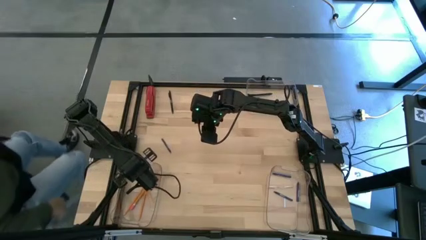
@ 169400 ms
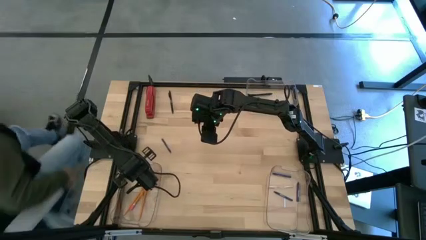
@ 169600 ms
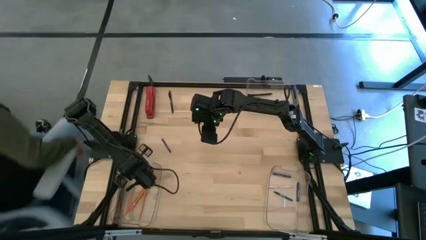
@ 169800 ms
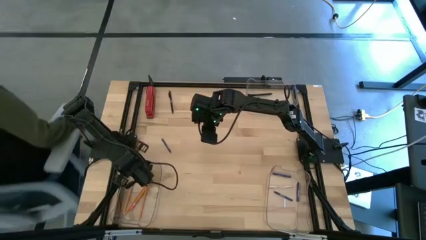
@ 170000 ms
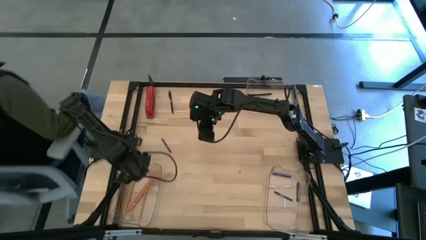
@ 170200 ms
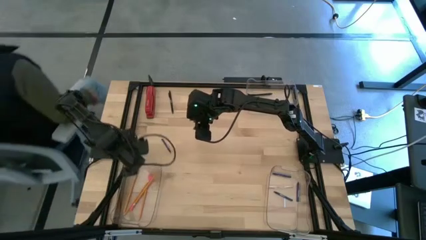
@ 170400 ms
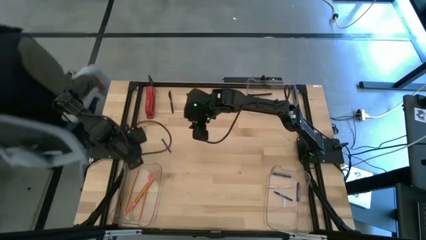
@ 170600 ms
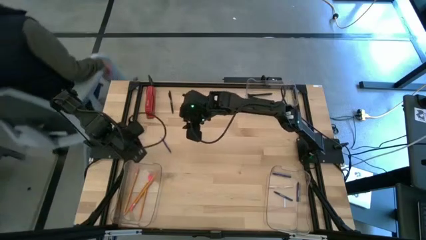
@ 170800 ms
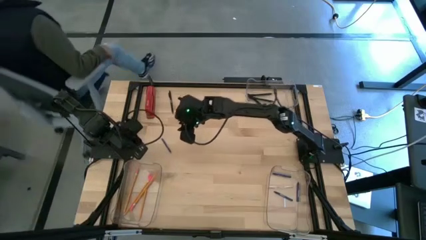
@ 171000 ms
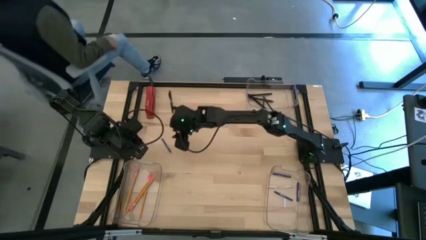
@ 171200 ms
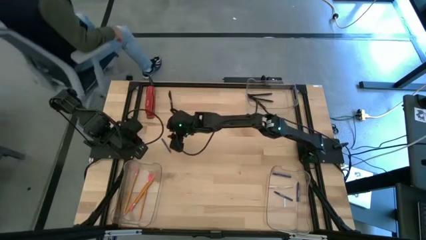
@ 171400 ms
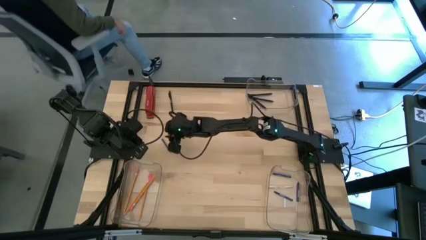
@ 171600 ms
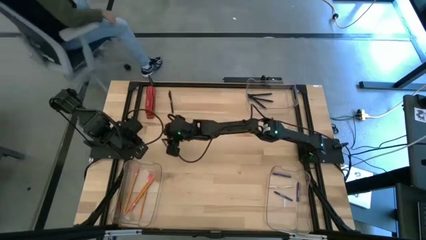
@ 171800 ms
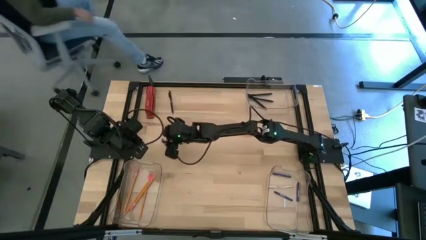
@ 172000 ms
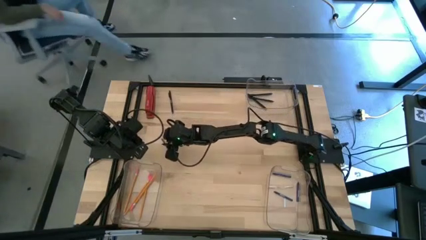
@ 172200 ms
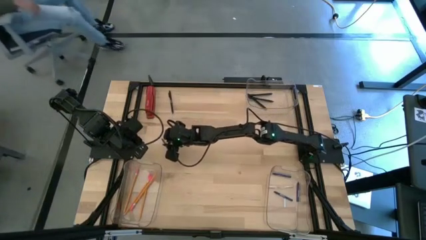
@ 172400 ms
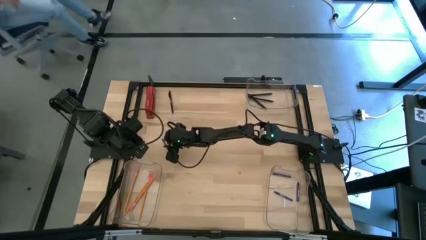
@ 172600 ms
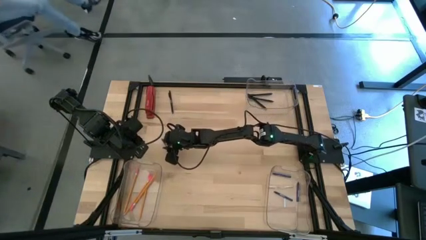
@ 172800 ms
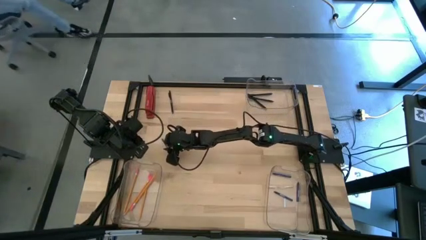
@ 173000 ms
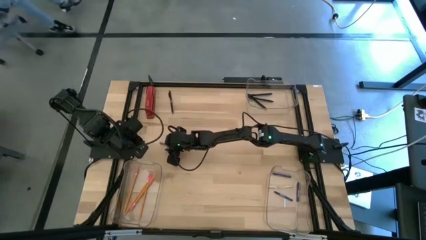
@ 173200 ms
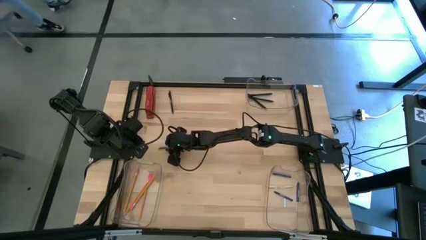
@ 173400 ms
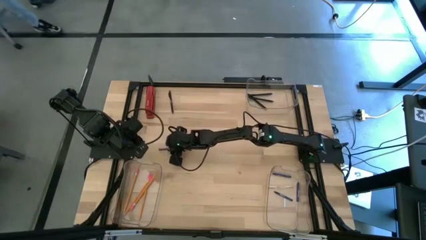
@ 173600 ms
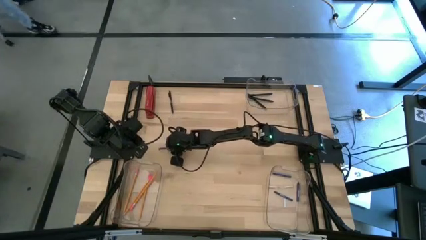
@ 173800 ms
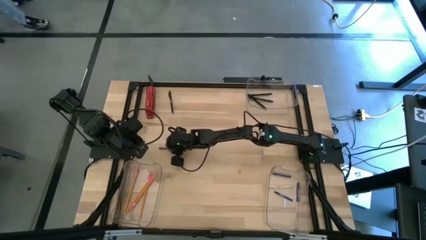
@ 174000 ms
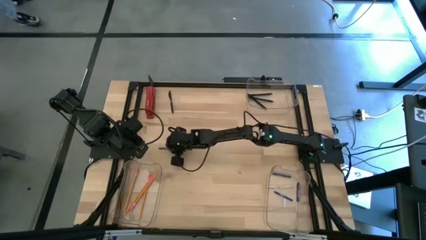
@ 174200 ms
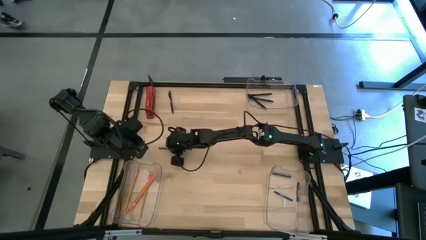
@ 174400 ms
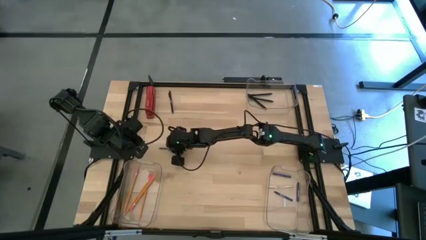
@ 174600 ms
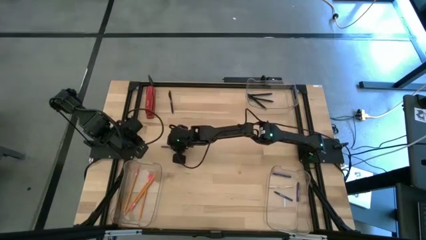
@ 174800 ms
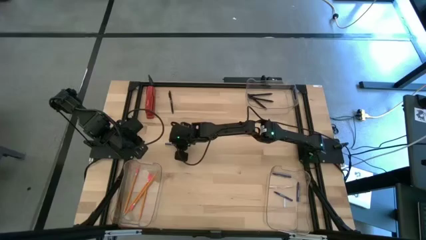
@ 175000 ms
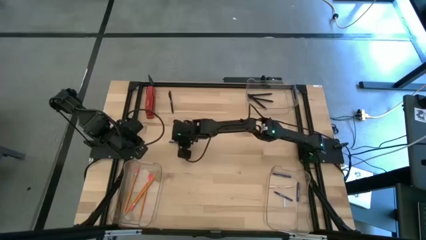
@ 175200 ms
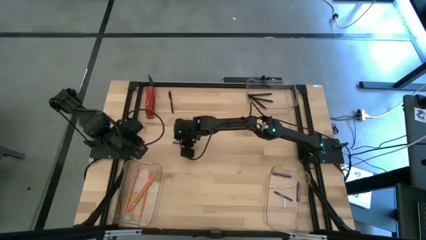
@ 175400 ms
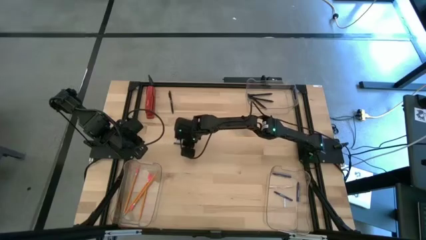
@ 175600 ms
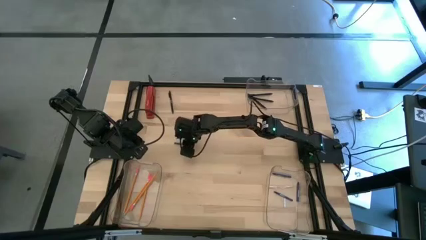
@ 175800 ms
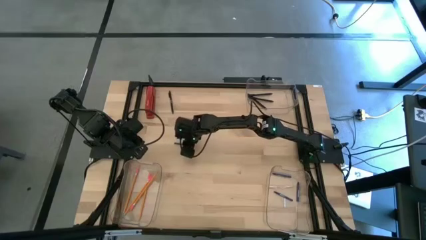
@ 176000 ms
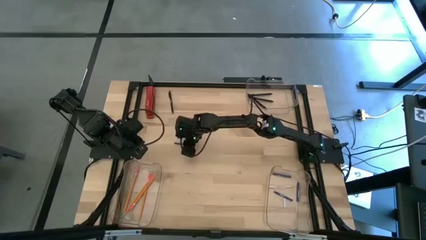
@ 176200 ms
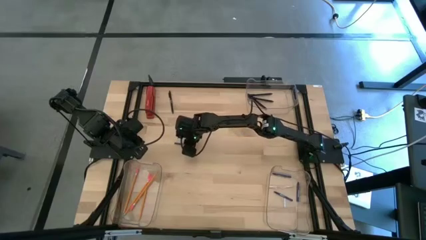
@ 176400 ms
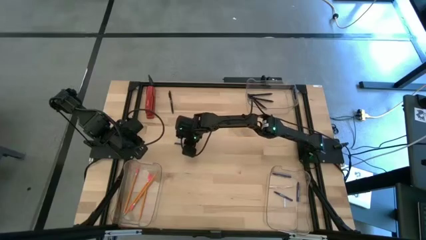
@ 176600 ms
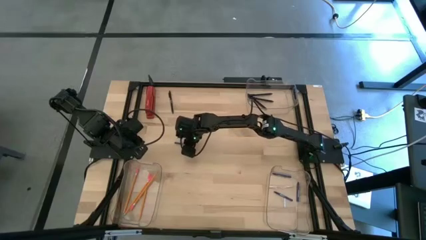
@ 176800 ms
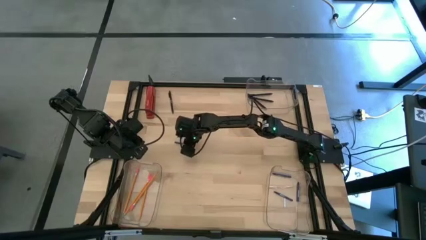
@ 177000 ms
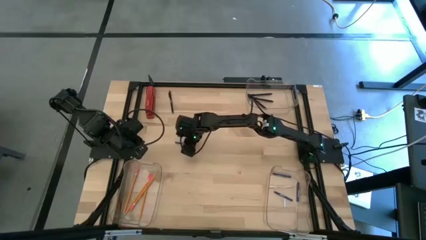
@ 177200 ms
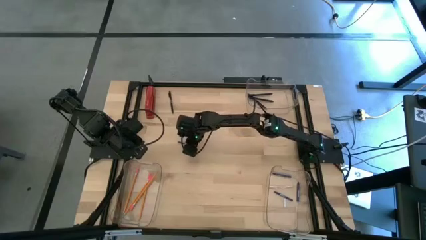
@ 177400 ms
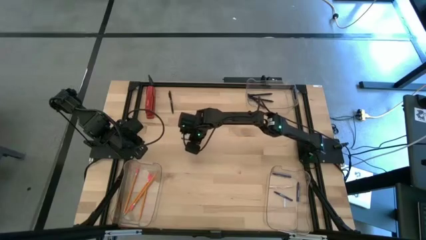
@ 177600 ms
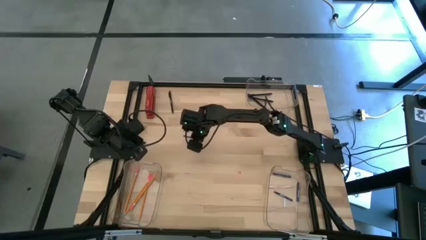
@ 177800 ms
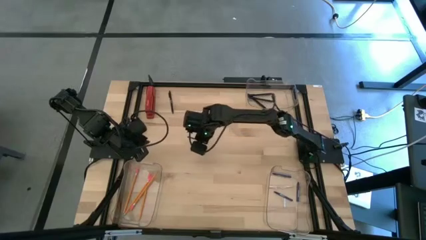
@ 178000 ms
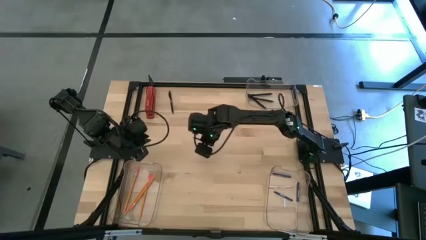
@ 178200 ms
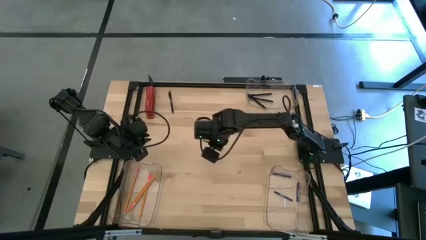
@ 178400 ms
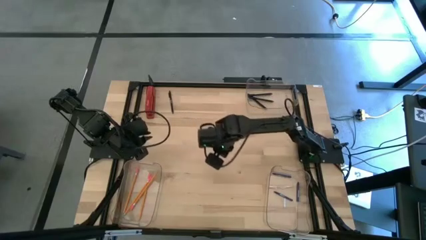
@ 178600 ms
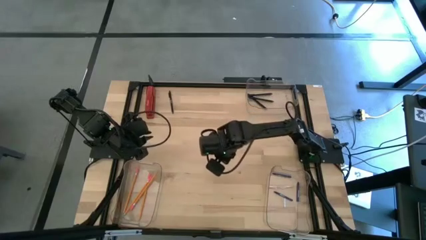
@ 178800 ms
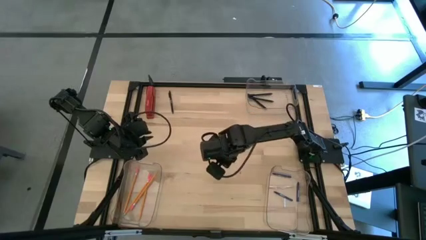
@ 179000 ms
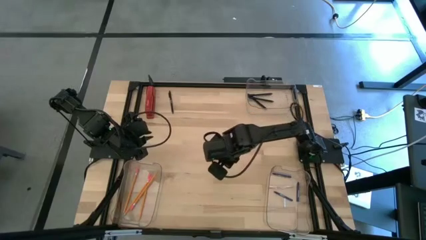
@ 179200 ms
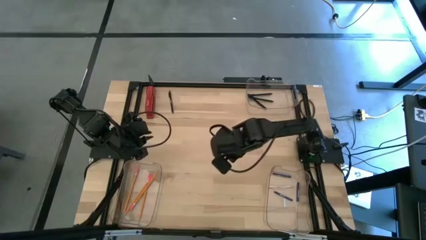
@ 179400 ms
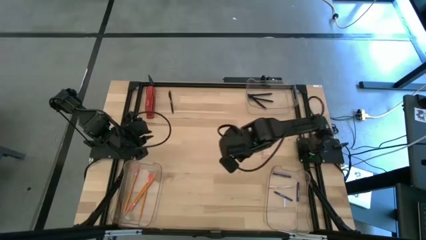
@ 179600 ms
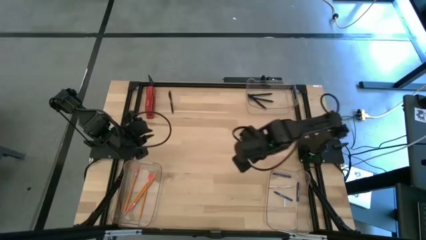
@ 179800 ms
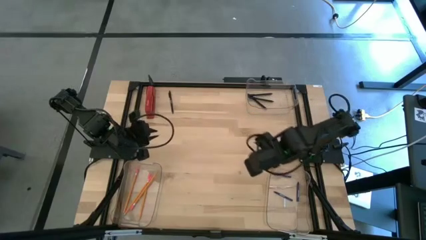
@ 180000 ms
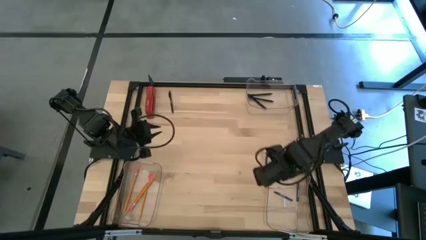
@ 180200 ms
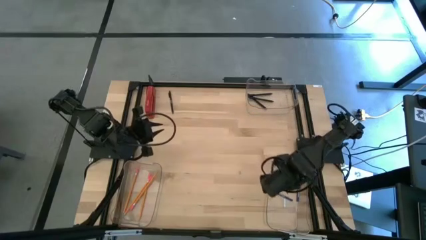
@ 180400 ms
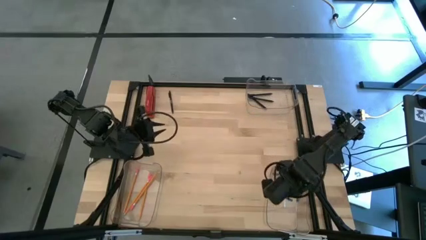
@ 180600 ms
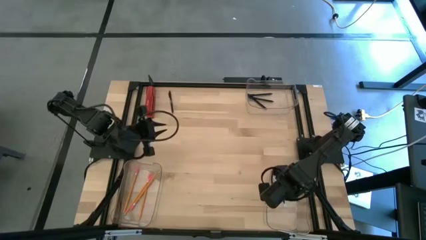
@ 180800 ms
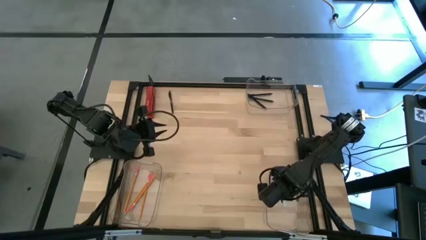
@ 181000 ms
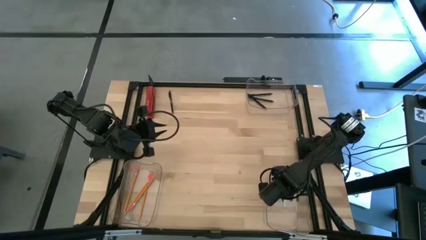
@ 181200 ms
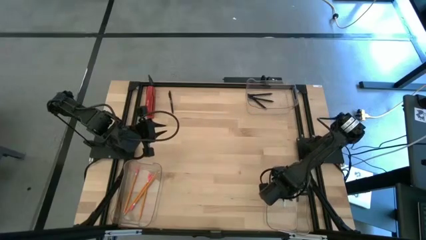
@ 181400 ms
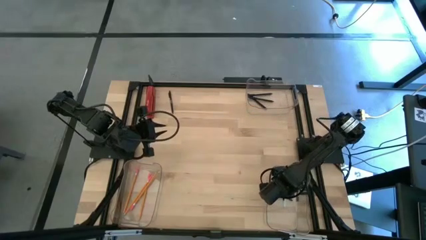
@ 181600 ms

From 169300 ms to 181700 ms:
Task: Sort crayons/erasers/pens/pencils in bins
Put the blue crayon into the bottom right transparent bin

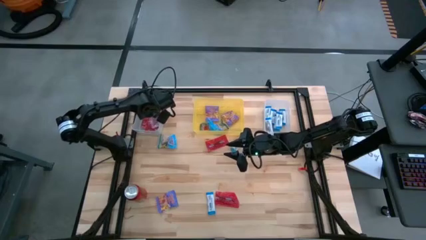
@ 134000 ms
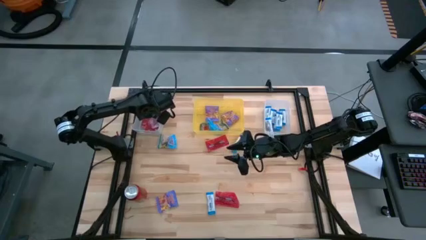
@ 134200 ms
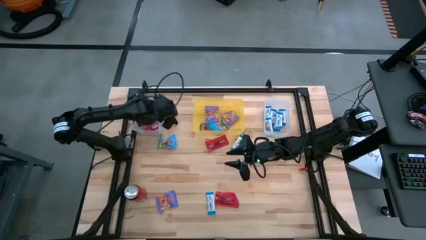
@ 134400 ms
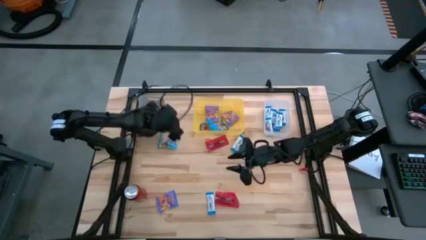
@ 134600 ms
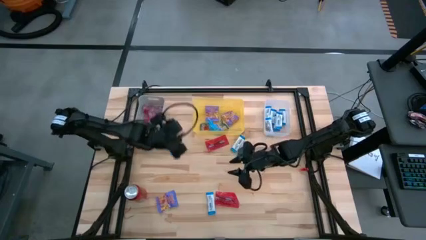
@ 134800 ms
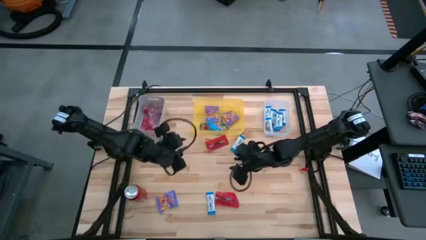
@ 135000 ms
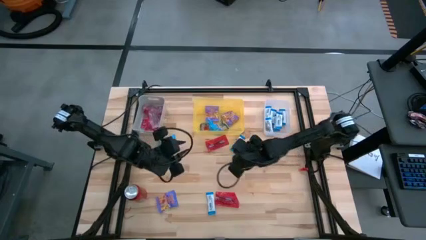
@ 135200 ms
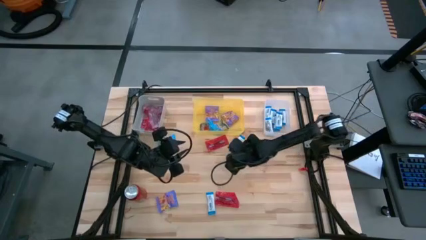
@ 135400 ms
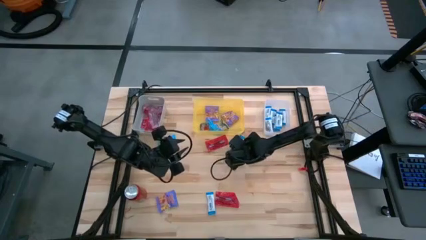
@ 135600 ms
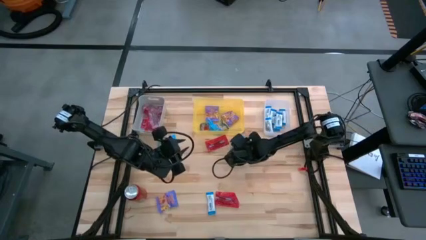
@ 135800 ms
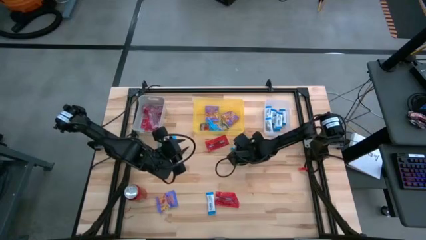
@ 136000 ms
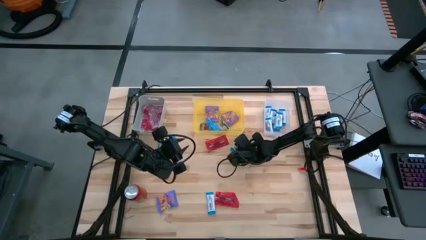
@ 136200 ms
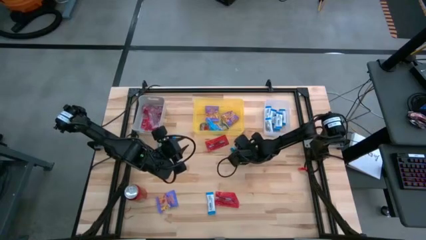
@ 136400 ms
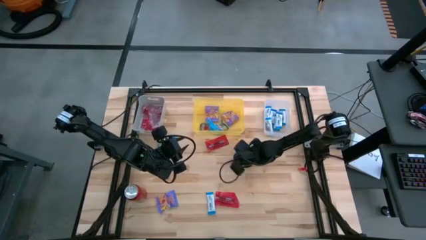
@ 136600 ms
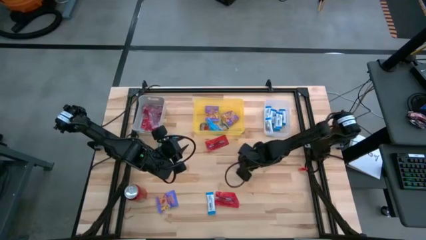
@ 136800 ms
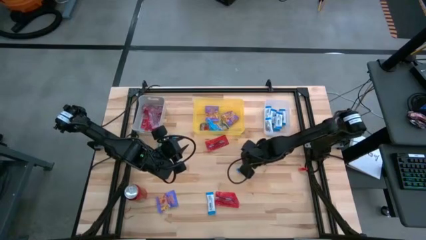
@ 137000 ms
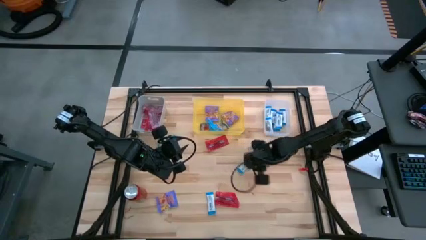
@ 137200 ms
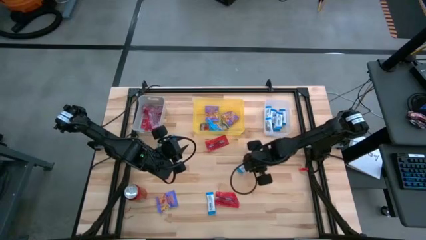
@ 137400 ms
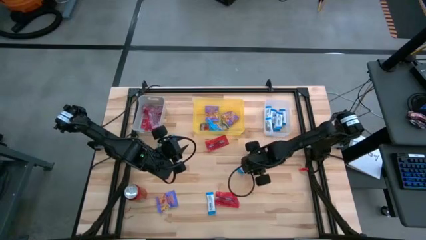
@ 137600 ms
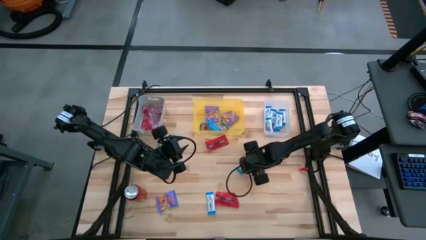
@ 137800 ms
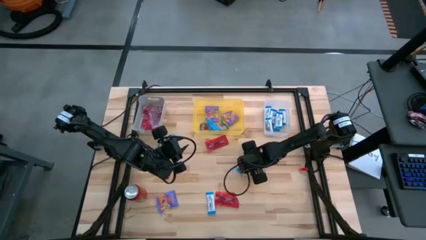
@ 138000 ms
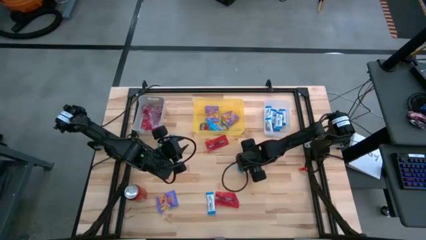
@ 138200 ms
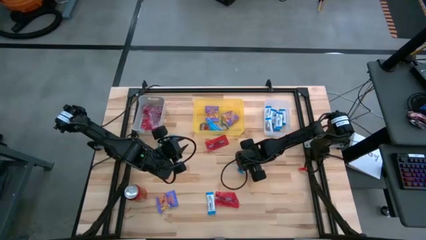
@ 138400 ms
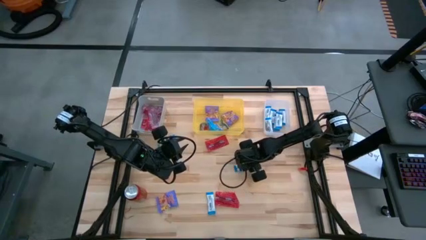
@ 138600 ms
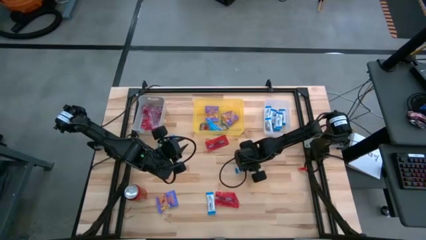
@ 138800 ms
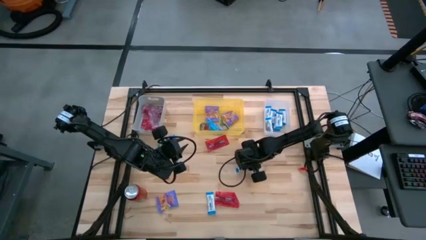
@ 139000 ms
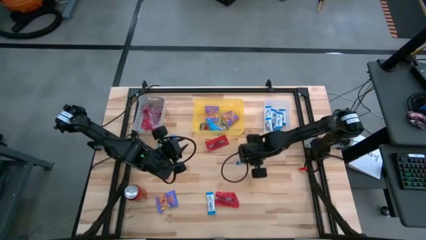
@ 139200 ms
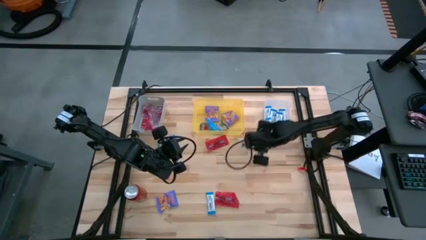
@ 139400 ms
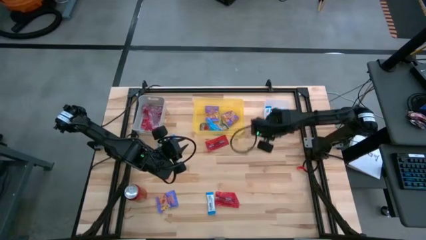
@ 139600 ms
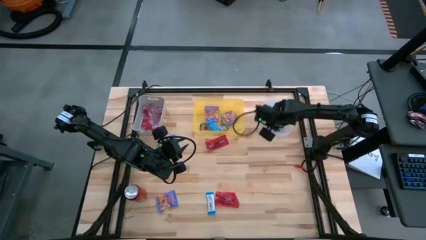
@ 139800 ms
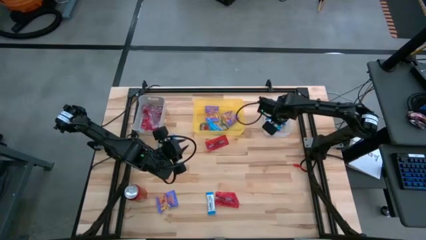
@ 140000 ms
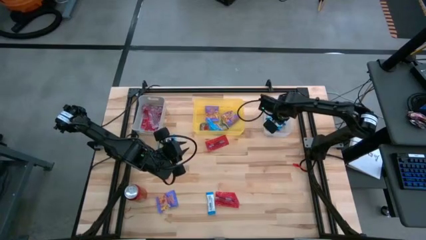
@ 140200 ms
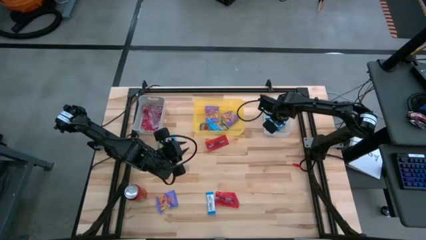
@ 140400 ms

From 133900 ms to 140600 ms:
Task: Sort candy
Put the white chocolate into the transparent bin
